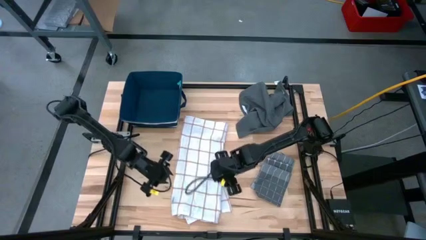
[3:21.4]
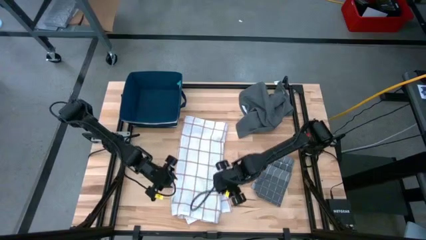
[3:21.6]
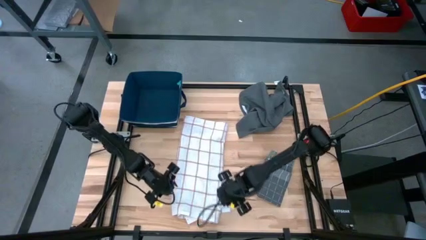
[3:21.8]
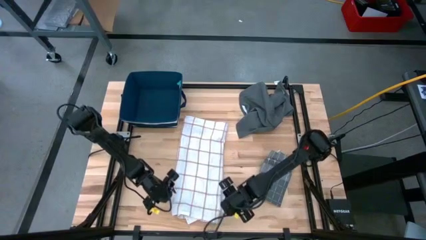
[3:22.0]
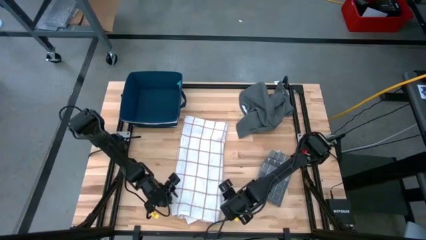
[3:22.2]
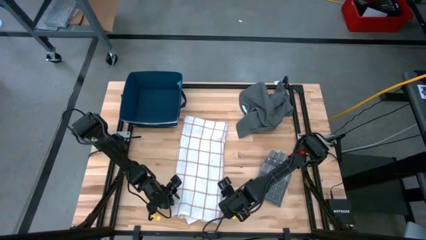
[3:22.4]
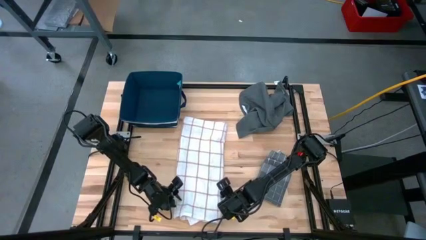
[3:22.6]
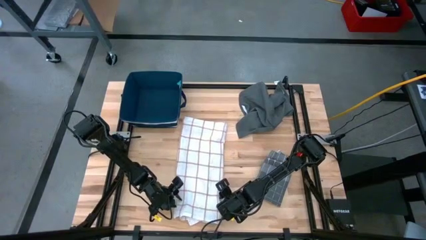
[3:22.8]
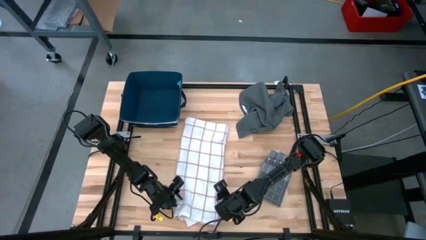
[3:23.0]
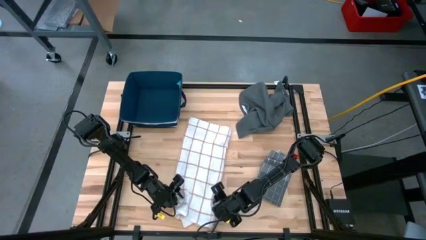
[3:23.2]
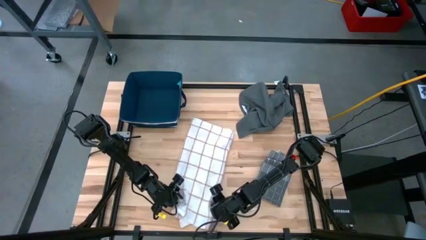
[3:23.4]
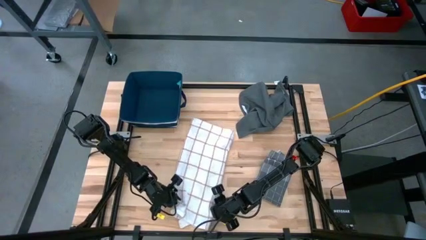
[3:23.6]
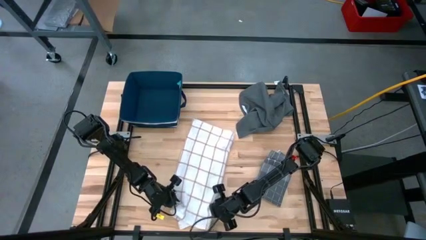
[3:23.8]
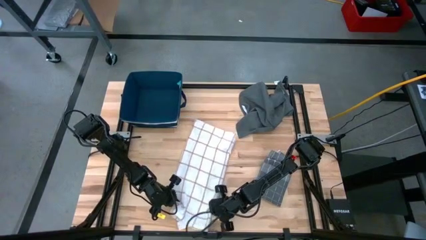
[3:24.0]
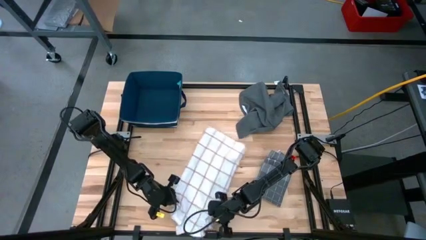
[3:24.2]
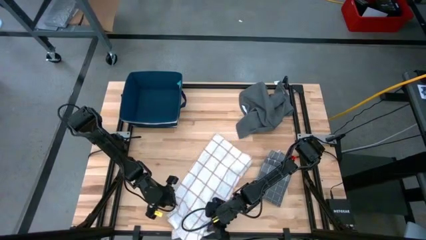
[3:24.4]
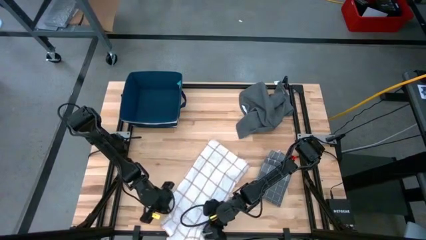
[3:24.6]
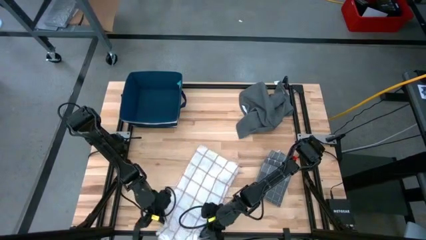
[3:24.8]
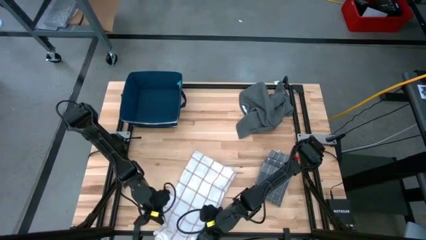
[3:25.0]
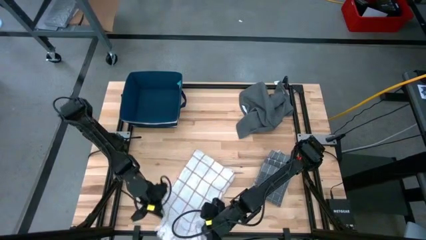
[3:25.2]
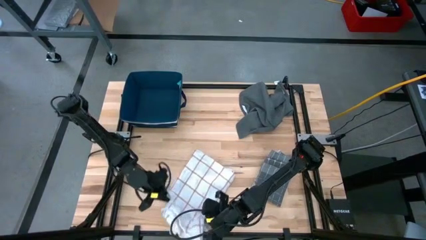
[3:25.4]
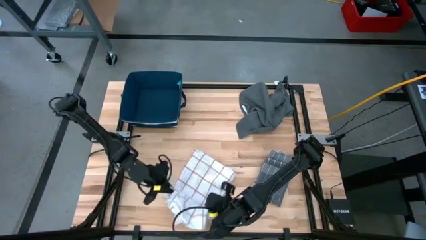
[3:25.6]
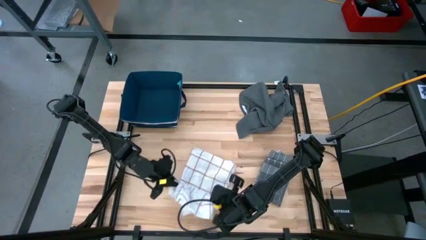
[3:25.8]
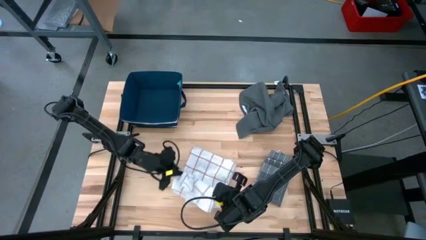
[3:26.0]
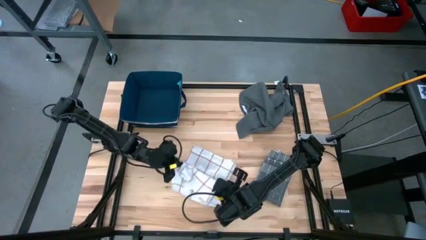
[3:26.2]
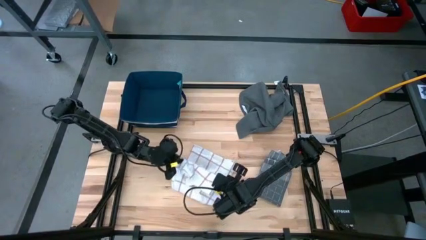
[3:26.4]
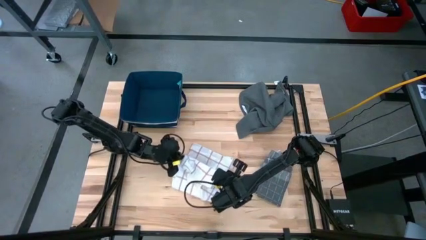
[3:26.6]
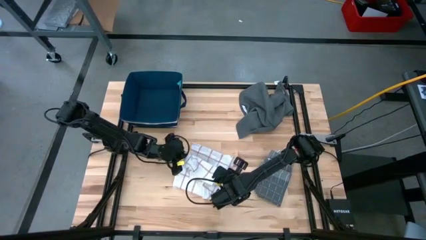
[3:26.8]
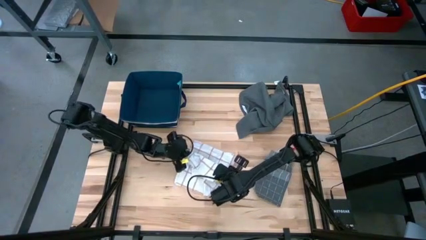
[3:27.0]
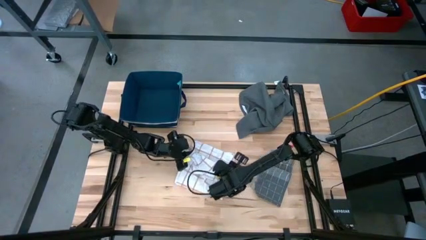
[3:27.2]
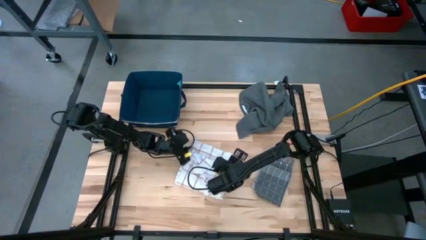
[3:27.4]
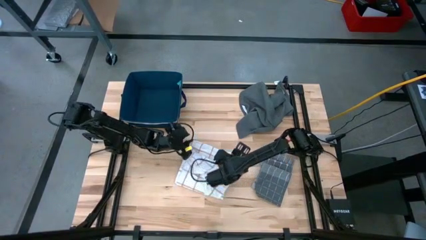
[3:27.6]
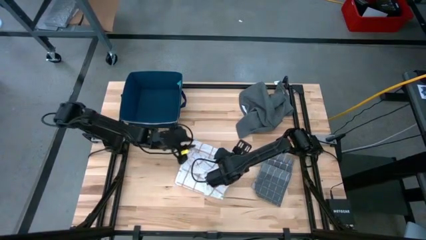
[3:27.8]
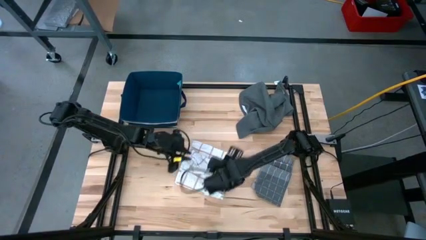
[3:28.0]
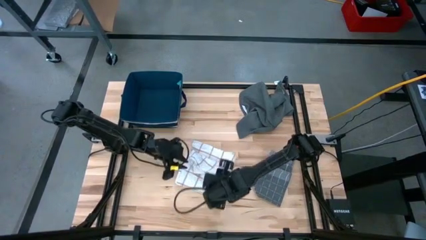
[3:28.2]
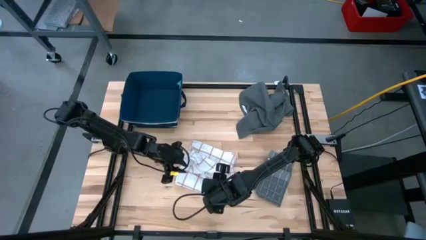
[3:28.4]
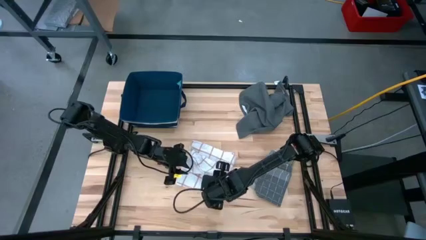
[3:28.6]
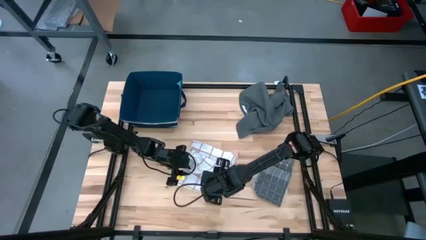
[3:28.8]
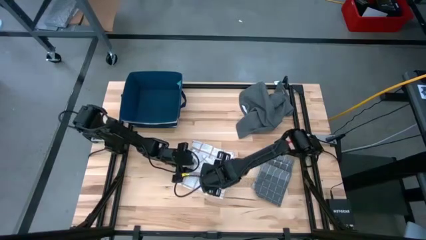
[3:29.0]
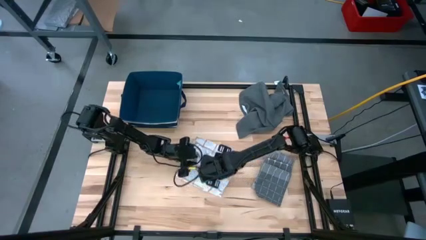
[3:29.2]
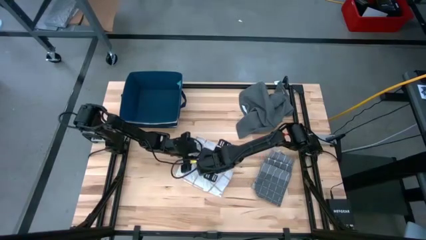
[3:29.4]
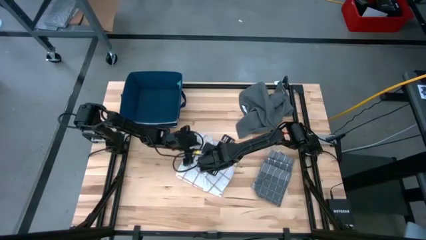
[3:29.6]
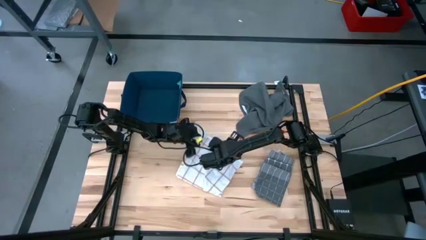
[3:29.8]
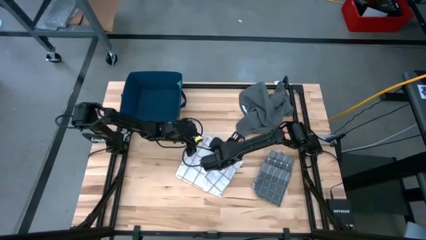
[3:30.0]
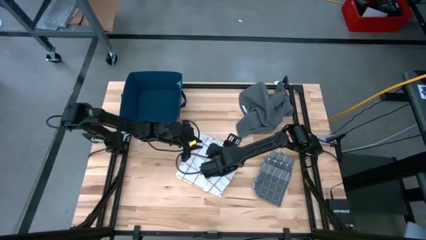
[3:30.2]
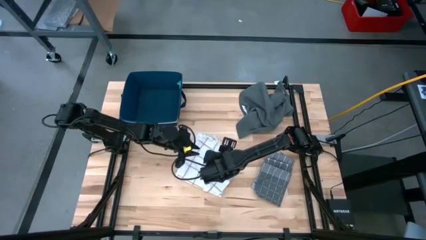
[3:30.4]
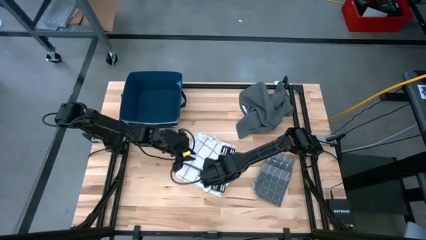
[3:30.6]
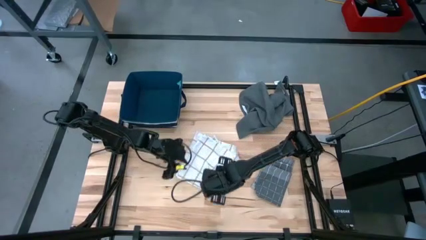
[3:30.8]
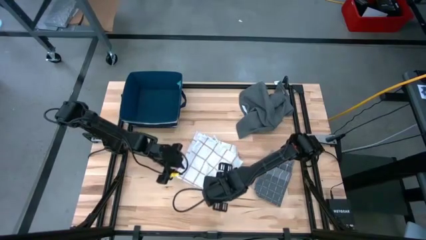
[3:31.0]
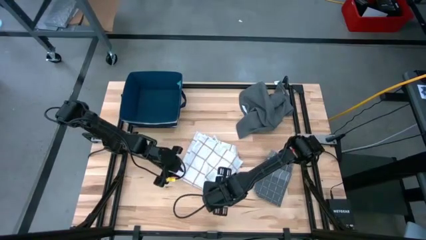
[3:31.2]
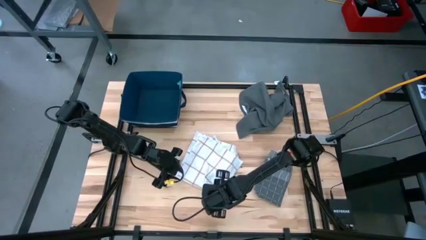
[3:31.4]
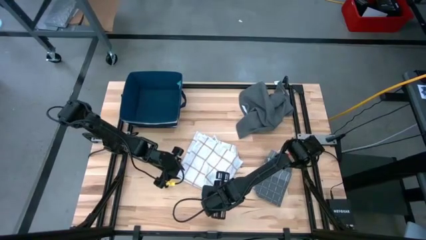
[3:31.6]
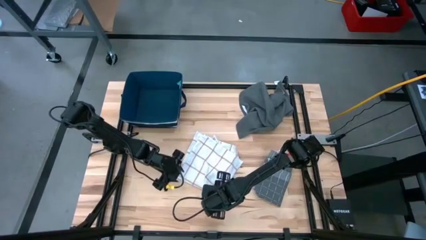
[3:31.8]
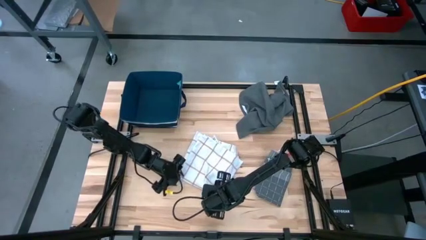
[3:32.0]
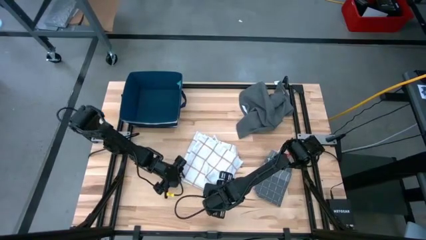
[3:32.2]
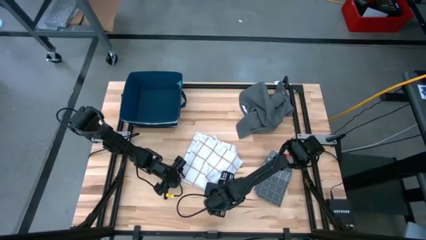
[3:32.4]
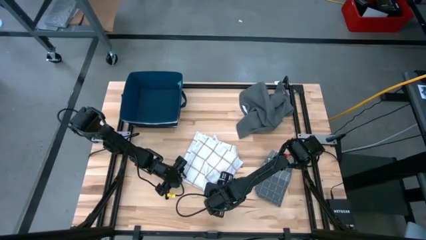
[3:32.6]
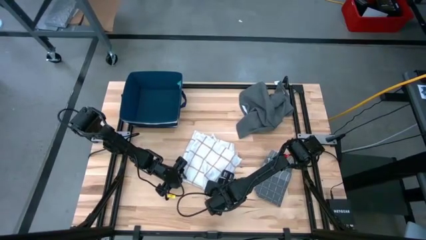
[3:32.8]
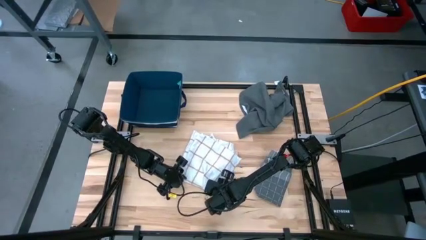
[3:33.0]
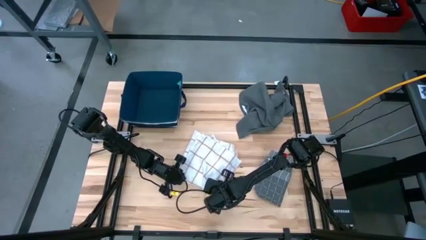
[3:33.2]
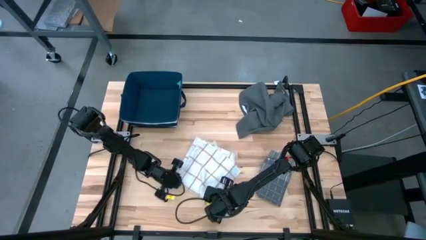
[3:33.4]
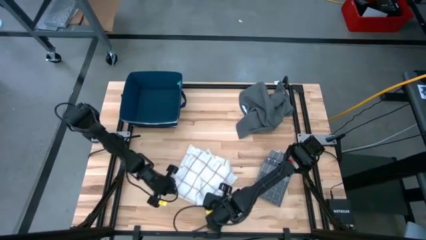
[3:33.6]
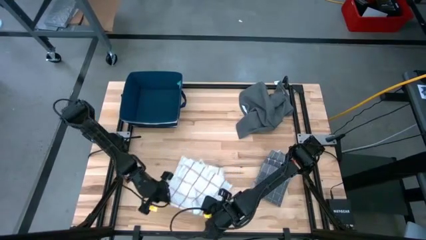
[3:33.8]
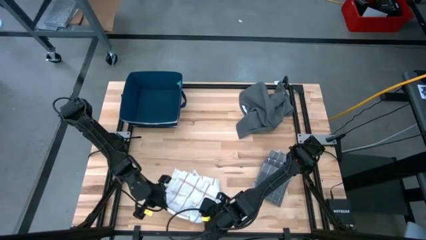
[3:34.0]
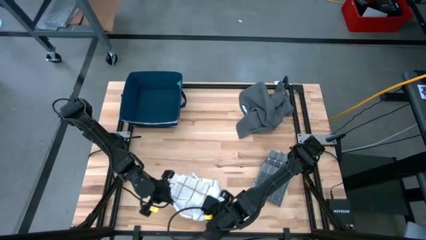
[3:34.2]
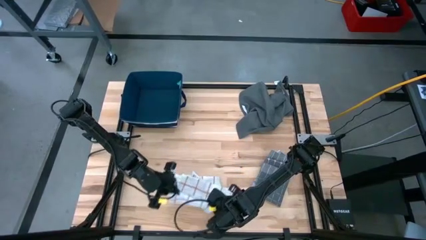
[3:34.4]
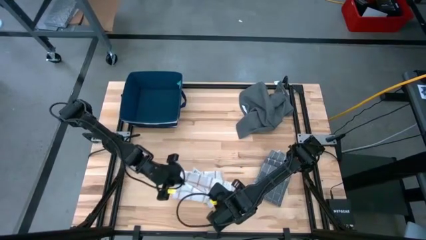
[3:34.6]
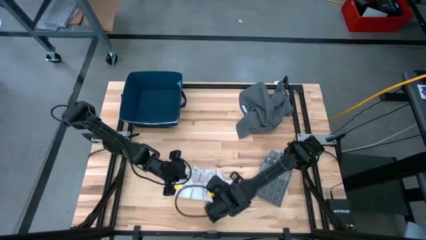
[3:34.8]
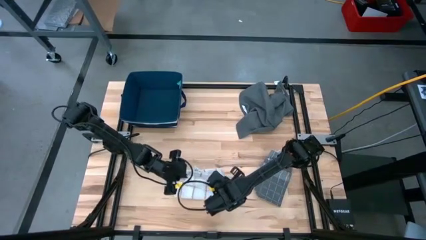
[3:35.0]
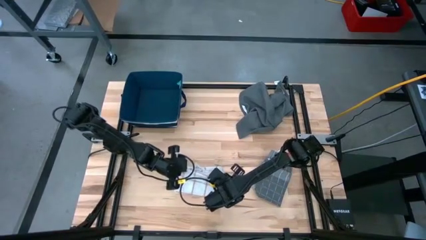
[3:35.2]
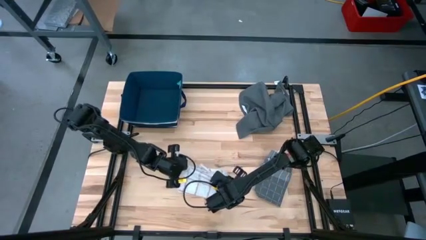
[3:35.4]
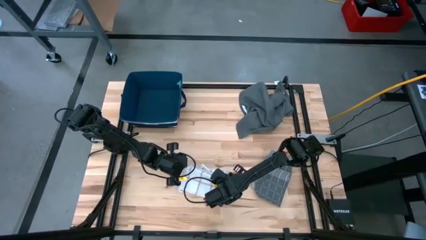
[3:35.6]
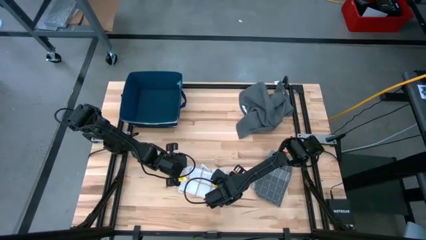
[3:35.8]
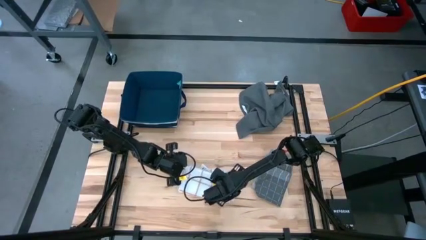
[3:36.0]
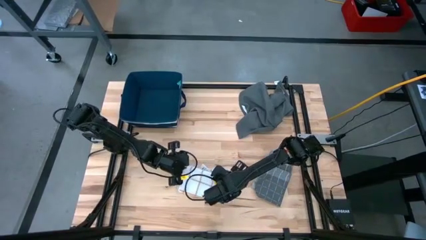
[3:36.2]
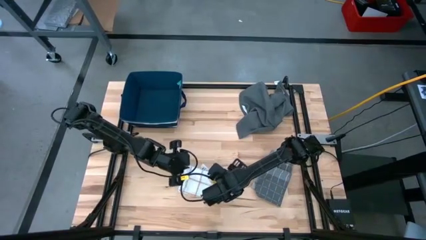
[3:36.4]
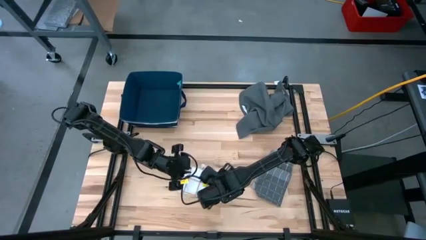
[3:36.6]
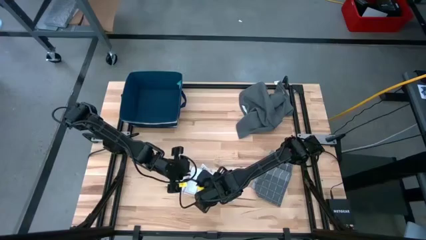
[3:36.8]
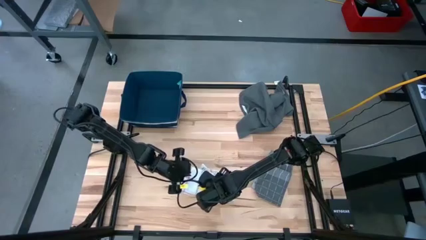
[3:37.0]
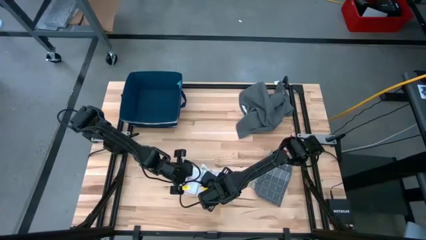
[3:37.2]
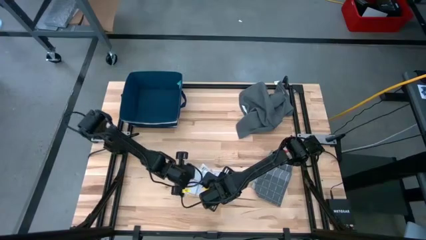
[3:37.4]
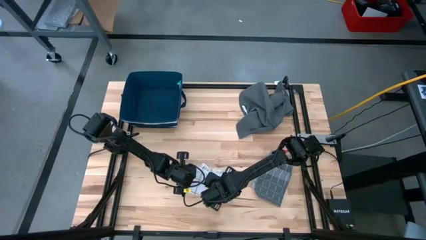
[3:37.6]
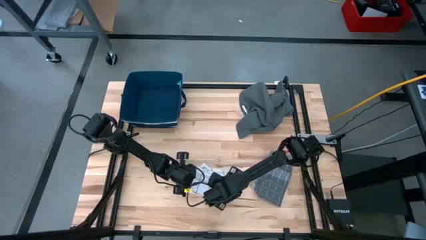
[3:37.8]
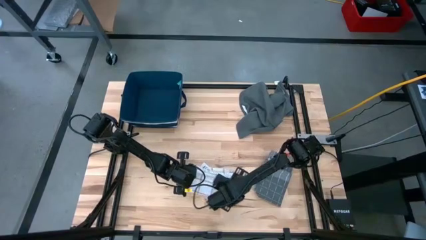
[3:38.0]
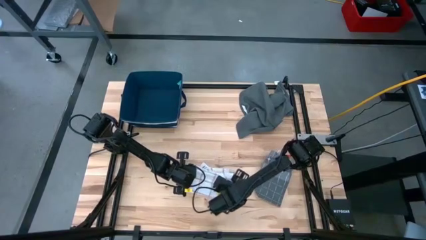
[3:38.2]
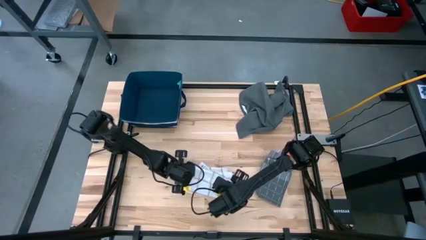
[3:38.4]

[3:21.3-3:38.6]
Task: Fold towel
Fold the white towel
